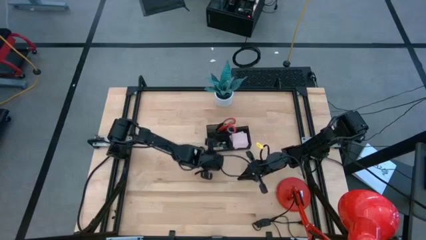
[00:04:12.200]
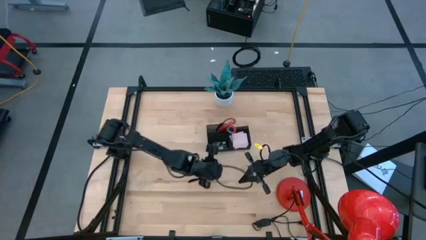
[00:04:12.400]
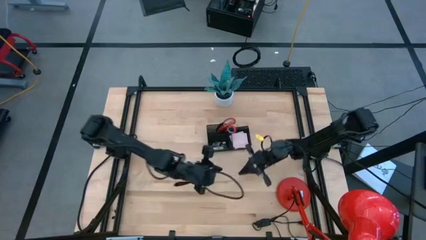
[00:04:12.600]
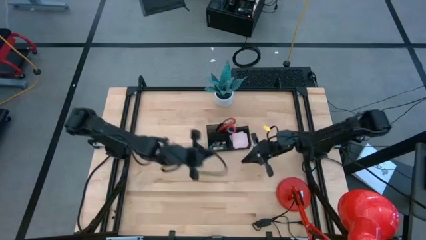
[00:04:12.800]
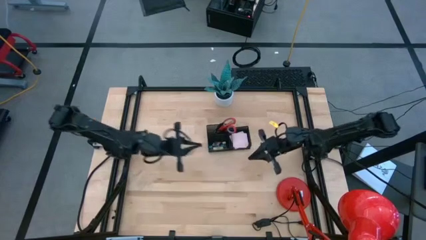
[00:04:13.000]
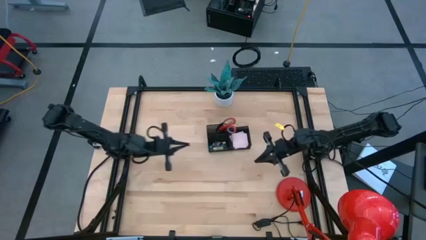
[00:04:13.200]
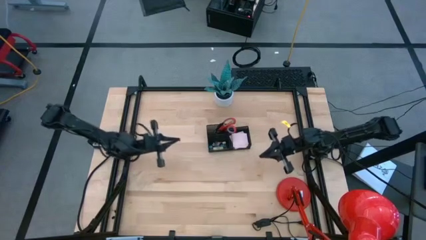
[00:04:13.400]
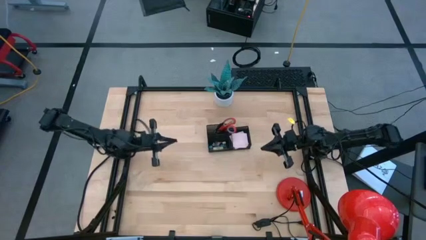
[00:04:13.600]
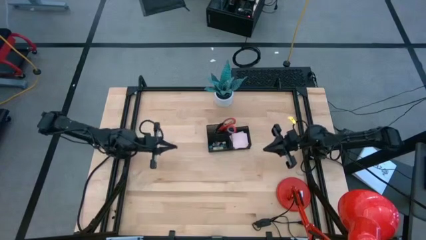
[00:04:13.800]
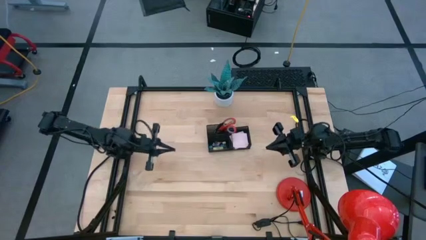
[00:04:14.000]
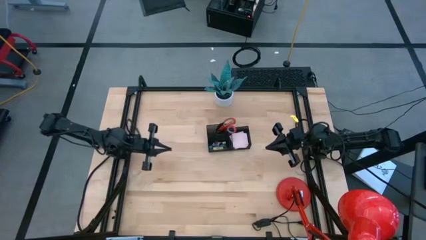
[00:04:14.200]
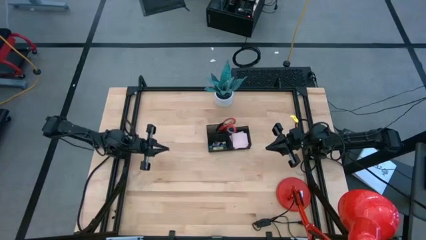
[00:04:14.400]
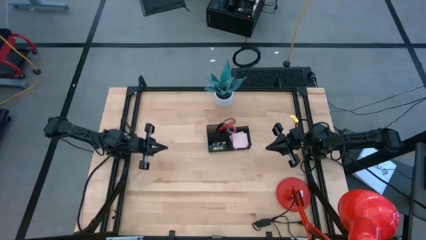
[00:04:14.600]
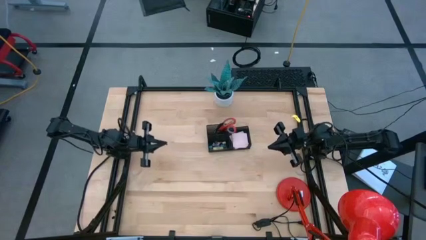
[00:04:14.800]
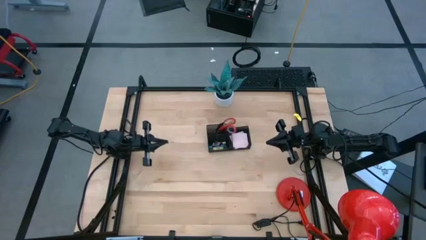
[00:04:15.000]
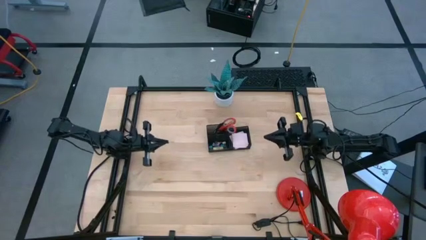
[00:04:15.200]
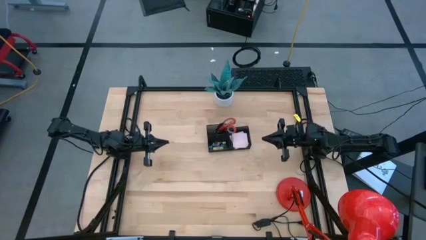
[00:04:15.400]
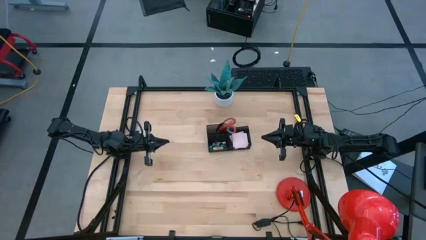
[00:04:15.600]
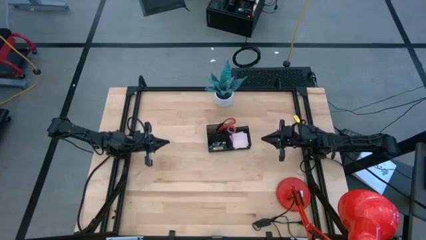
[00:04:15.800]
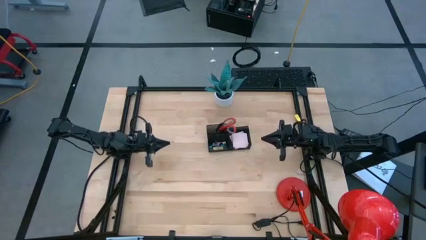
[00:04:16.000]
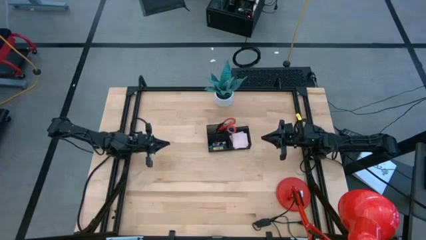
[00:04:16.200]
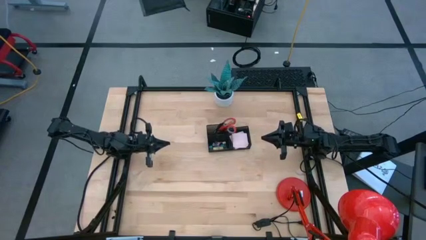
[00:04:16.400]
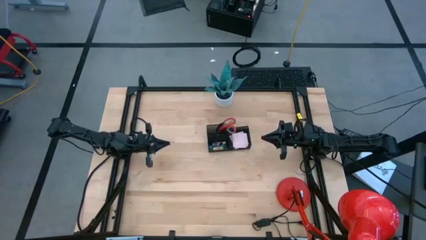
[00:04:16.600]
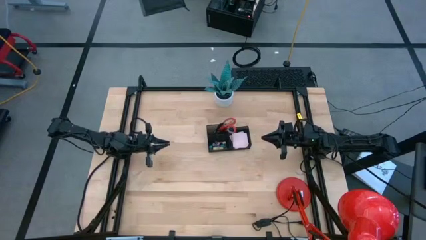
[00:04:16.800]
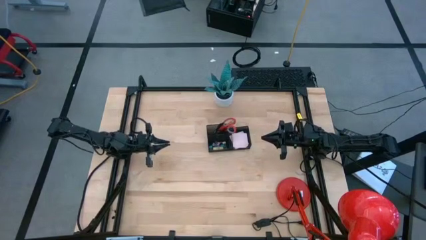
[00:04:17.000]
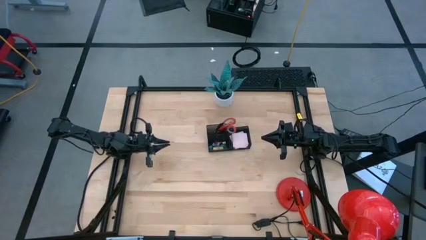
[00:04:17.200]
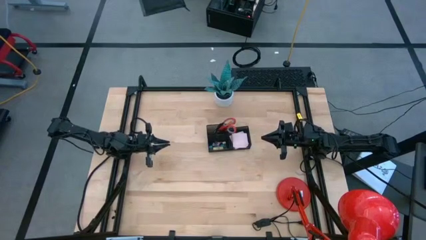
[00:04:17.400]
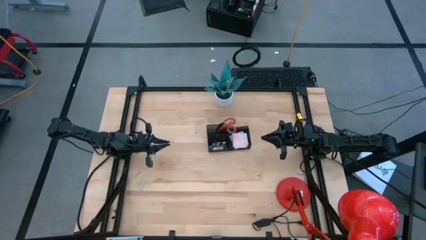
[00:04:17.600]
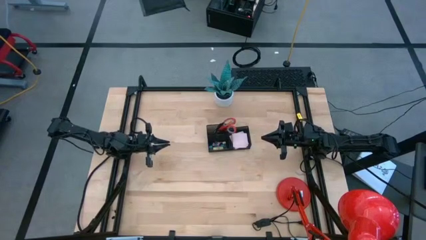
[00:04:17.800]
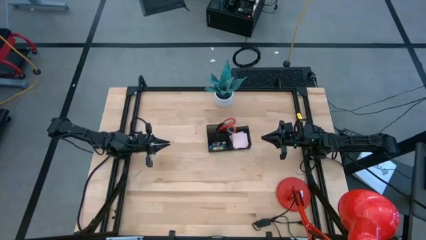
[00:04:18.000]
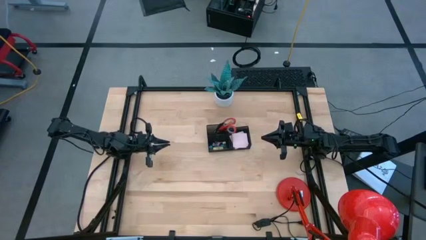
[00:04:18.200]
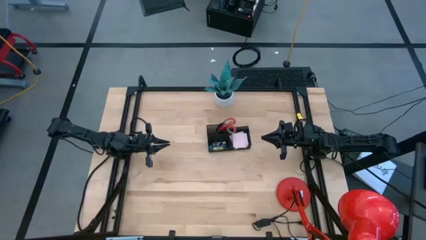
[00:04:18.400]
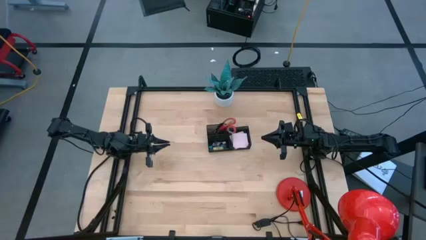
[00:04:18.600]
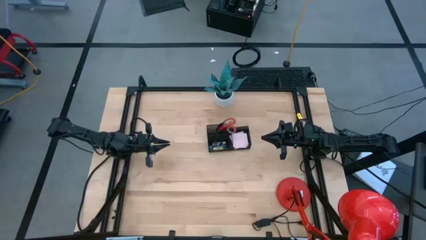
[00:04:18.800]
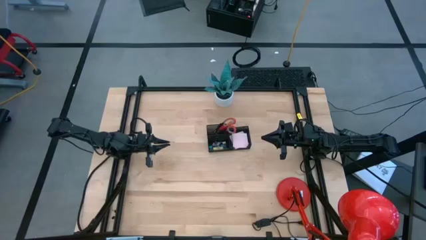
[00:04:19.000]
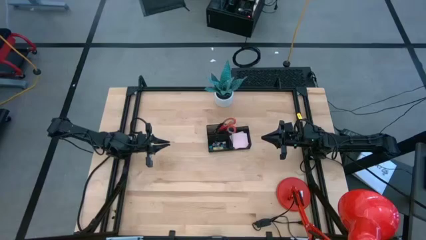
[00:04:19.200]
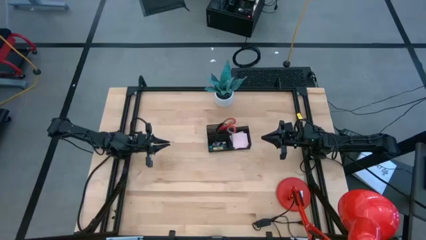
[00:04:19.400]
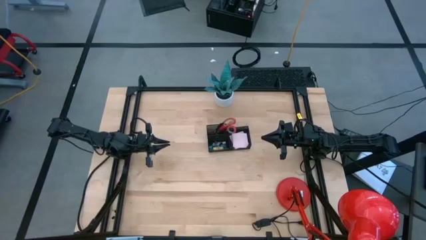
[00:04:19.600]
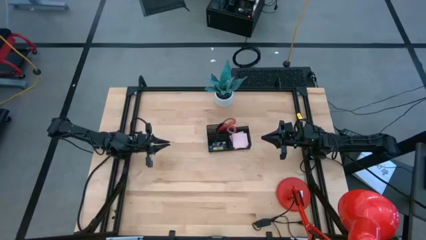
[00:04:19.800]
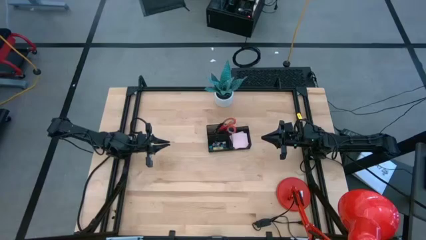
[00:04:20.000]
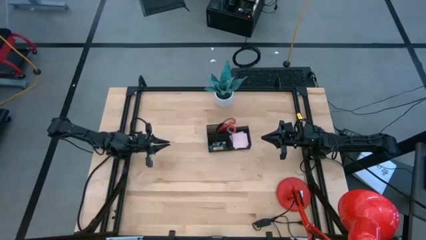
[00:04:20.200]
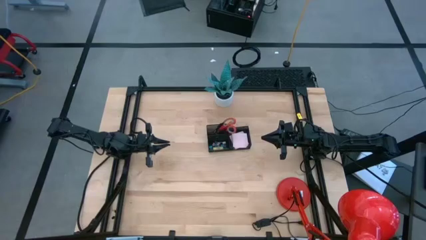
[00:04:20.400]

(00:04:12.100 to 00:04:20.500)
Task: Pick and place office supplies into organizer
Return to Home Position

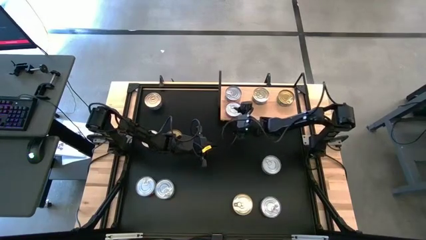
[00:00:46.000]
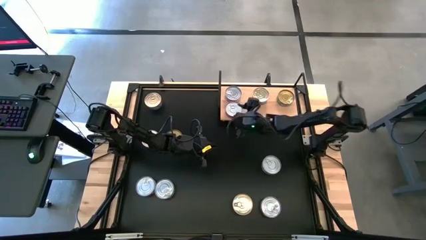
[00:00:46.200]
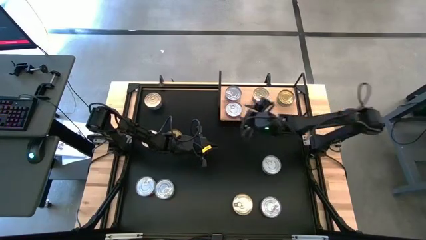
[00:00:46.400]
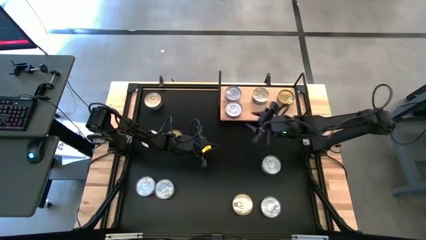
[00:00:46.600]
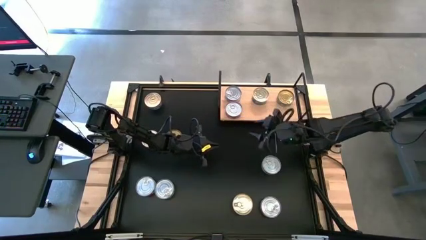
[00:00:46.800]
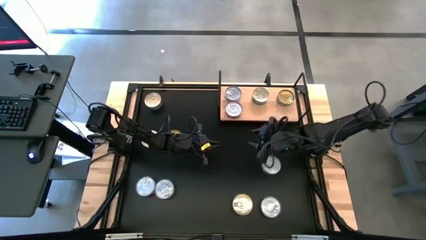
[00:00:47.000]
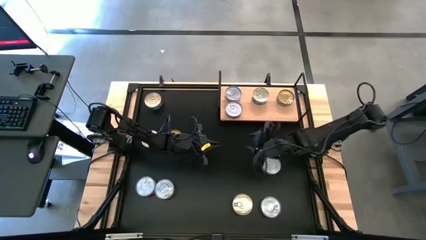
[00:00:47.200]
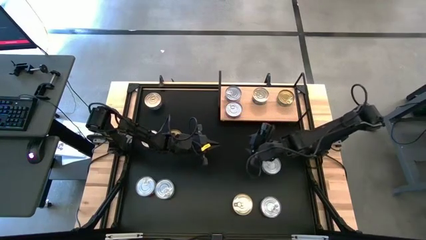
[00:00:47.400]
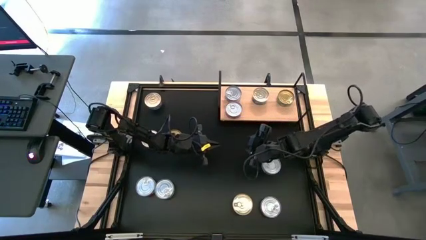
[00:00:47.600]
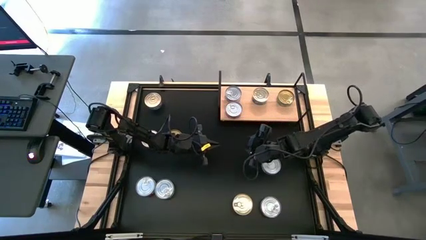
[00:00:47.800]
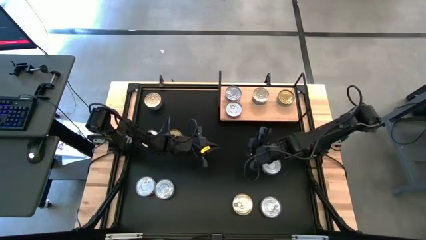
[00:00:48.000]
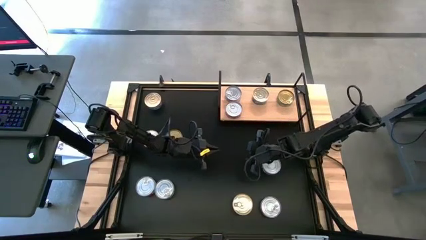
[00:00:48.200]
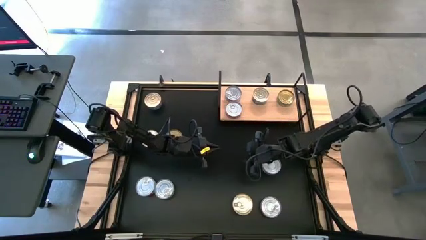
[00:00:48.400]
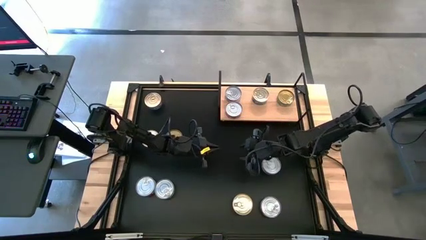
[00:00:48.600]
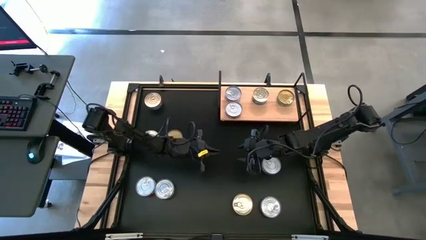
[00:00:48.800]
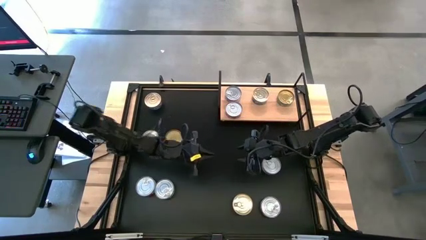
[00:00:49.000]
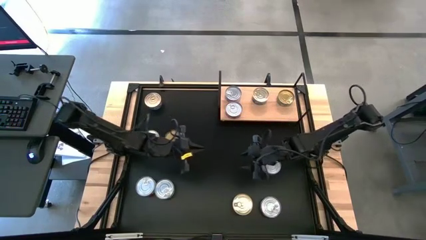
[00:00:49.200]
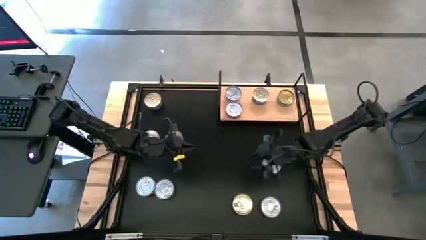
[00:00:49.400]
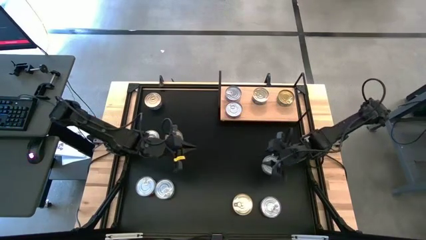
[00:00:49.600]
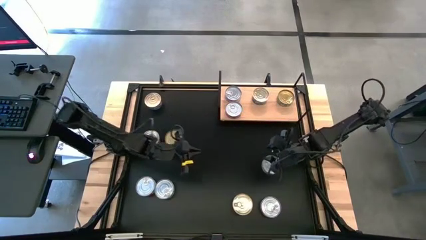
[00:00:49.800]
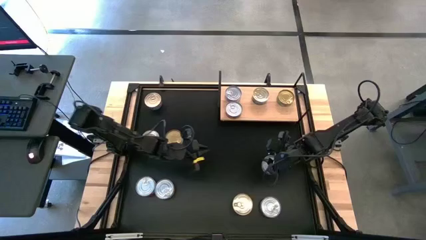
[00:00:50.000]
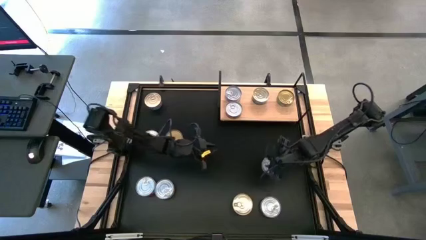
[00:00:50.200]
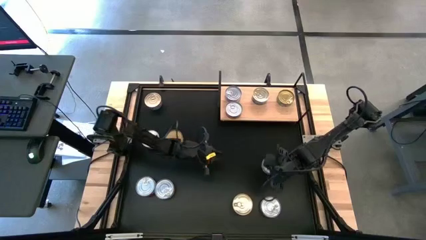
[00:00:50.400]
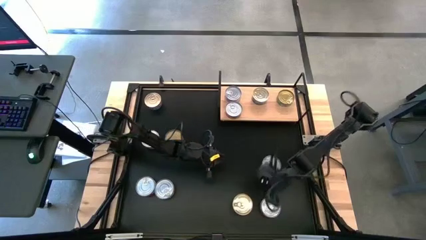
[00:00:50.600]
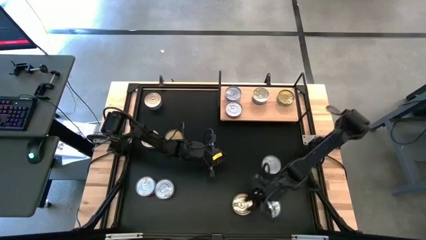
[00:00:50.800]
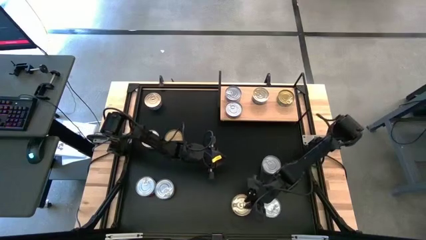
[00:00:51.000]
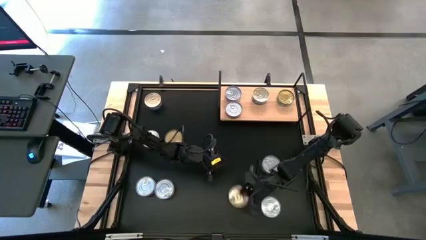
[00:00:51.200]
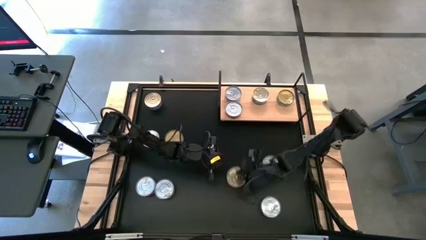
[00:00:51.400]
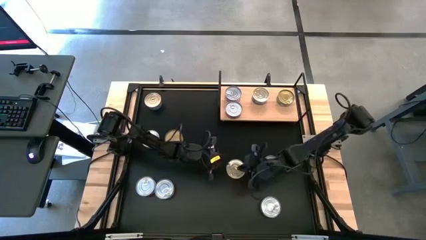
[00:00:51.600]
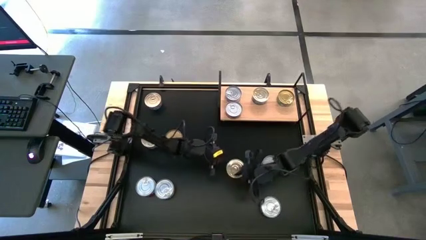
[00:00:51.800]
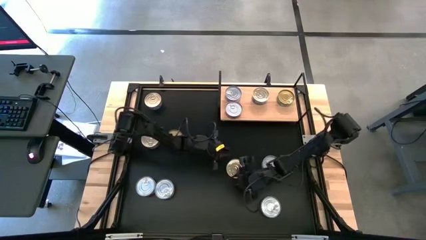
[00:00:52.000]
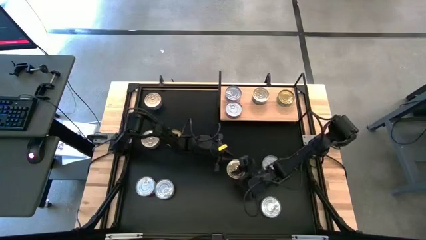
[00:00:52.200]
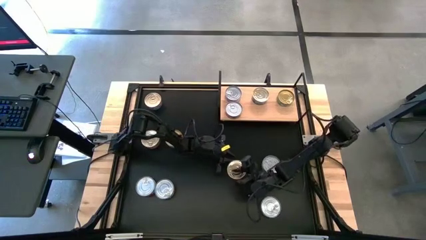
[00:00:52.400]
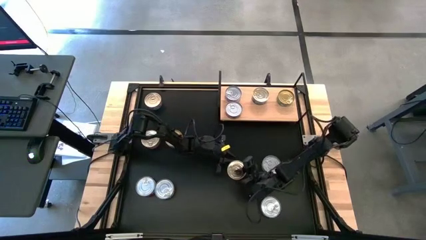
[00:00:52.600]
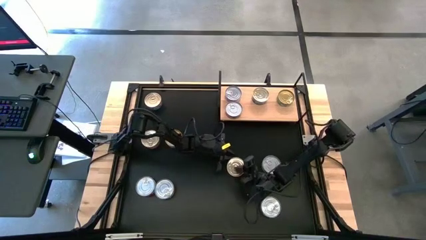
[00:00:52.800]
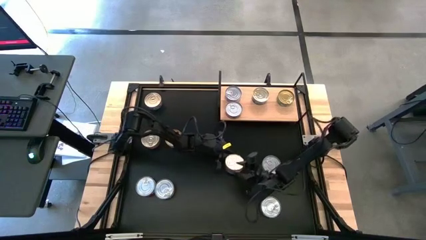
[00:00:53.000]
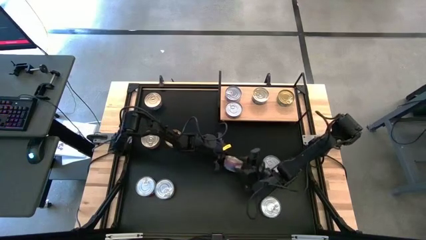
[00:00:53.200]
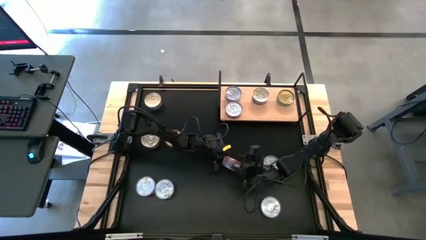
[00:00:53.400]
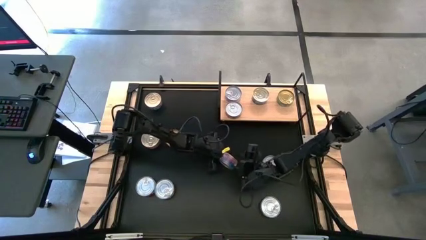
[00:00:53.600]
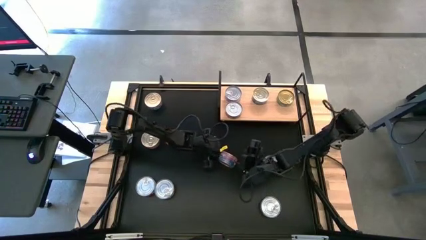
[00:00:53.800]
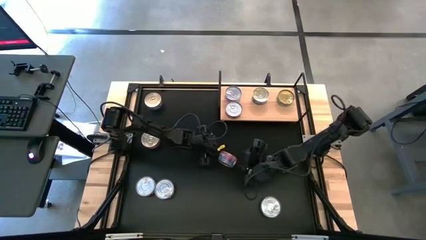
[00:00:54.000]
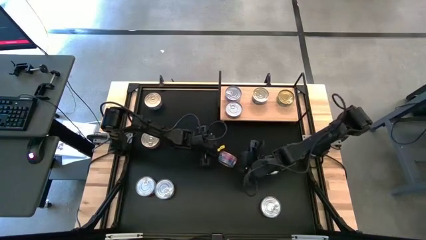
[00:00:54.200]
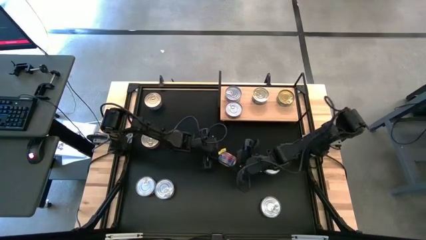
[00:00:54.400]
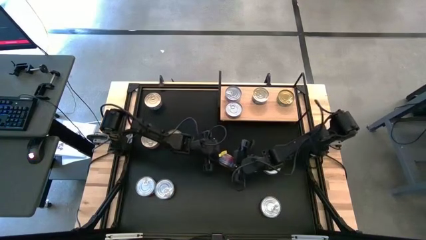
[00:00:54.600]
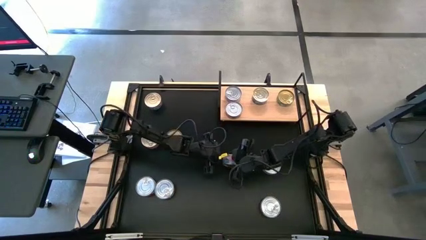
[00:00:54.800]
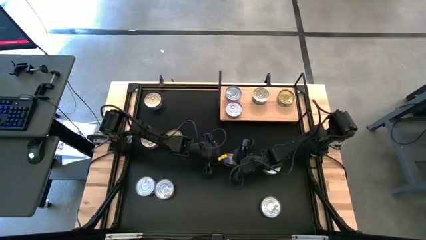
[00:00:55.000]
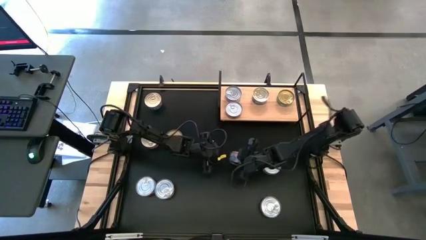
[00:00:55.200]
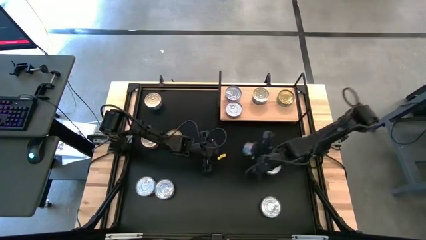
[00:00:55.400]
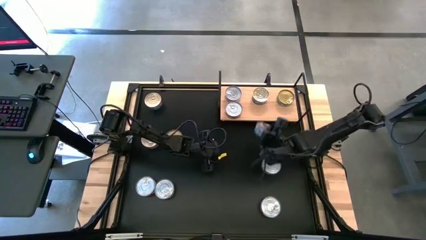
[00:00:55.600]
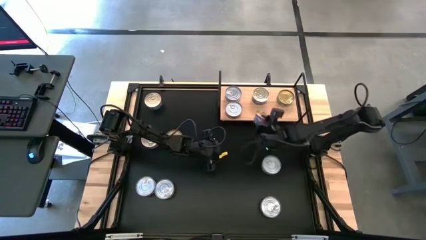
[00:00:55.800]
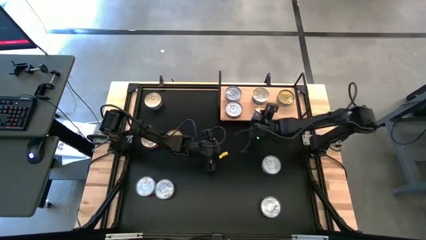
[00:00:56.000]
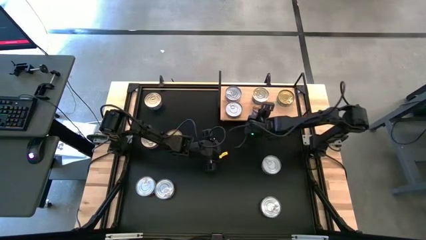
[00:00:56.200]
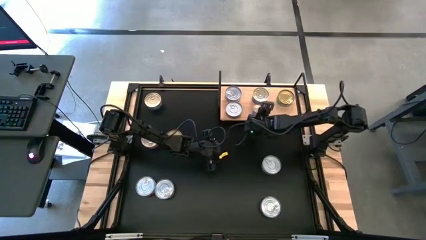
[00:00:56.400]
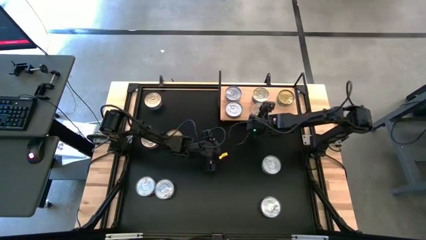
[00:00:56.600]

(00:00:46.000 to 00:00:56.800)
Task: Stack canned seafood by type on shelf
Put the blue-pink tuna can on the shelf
